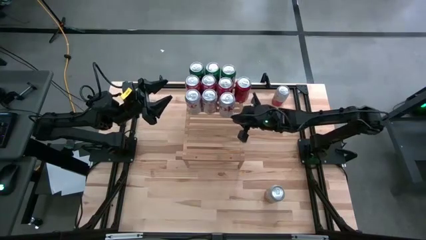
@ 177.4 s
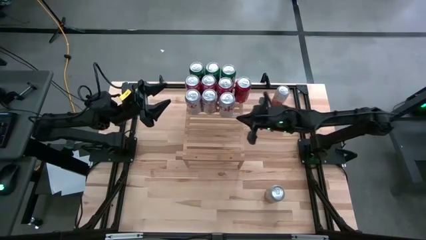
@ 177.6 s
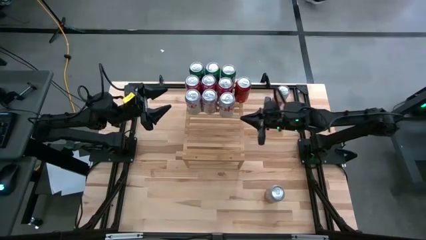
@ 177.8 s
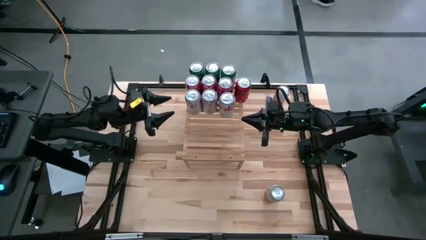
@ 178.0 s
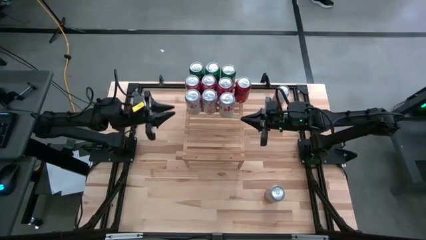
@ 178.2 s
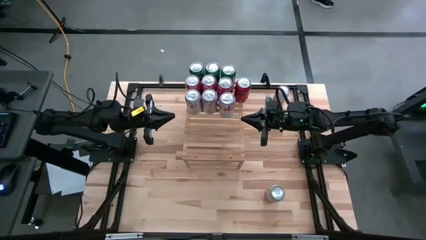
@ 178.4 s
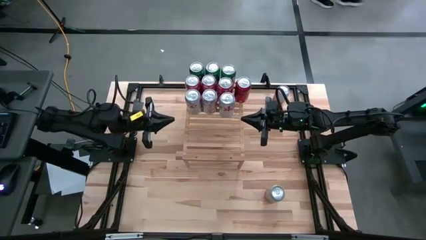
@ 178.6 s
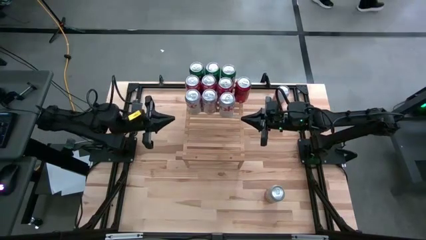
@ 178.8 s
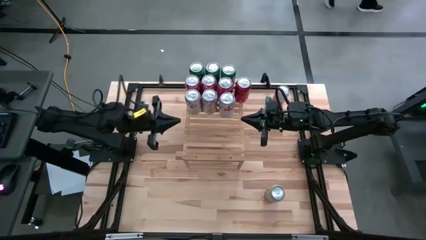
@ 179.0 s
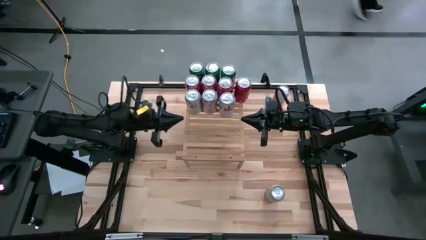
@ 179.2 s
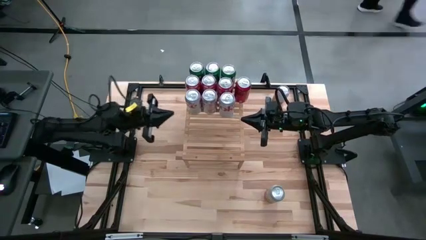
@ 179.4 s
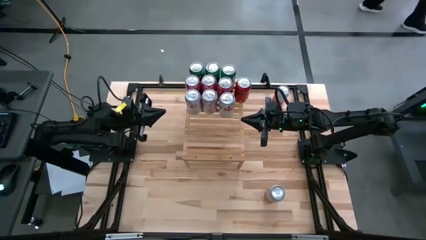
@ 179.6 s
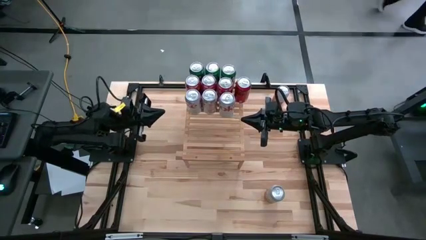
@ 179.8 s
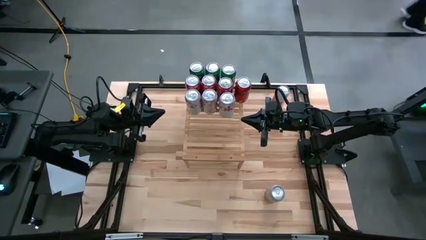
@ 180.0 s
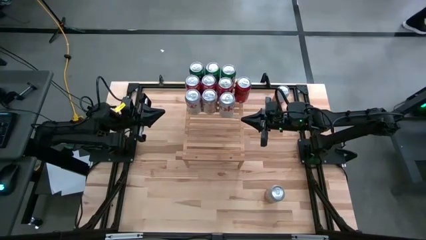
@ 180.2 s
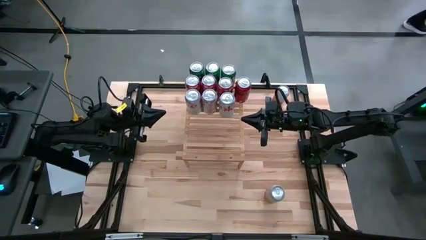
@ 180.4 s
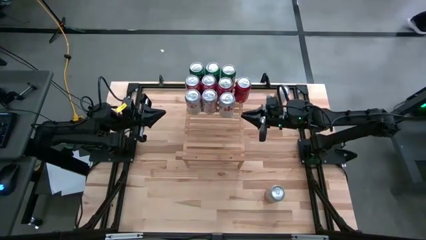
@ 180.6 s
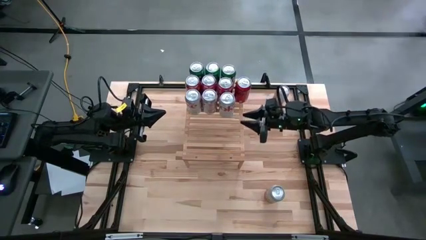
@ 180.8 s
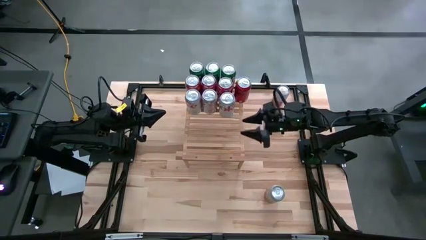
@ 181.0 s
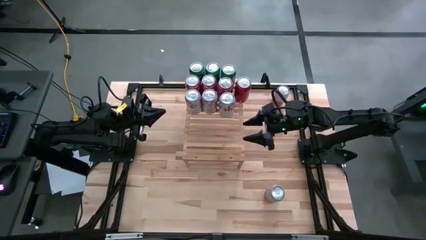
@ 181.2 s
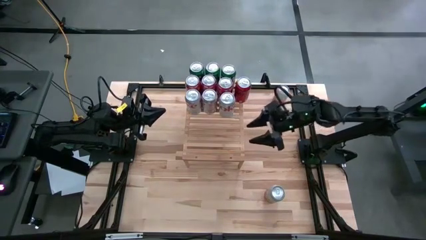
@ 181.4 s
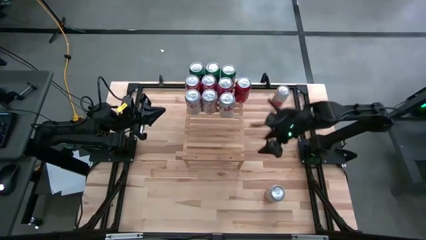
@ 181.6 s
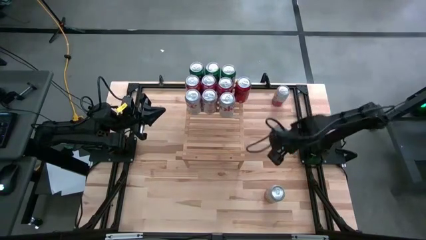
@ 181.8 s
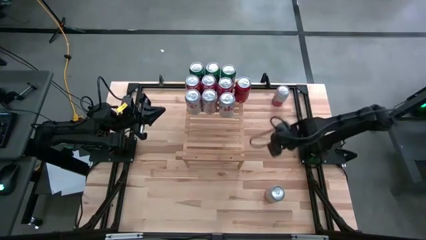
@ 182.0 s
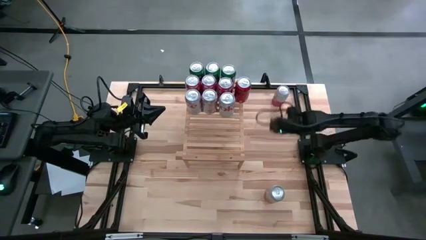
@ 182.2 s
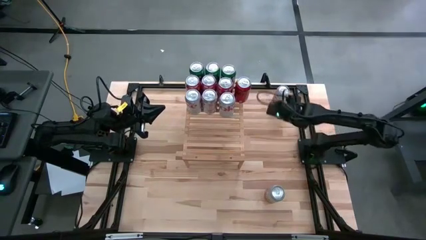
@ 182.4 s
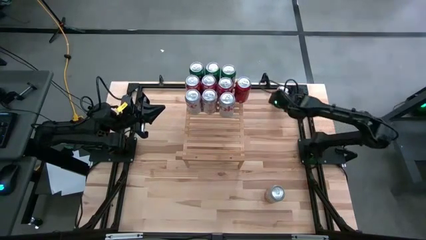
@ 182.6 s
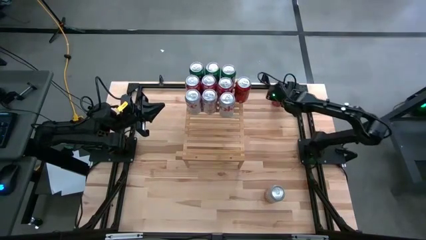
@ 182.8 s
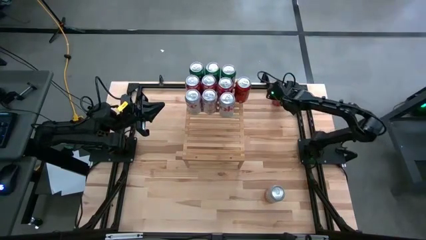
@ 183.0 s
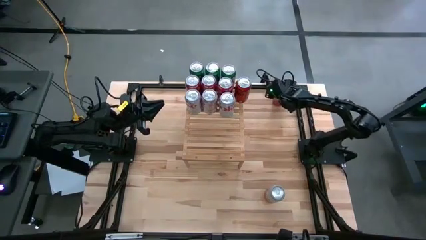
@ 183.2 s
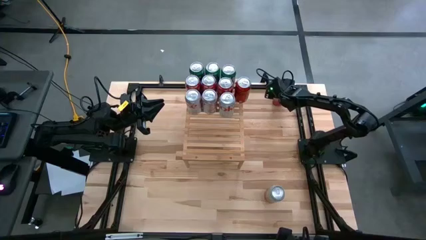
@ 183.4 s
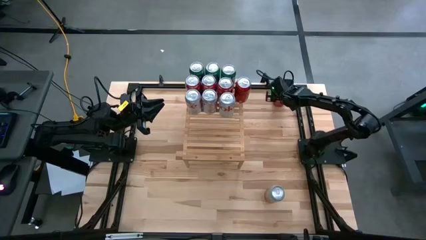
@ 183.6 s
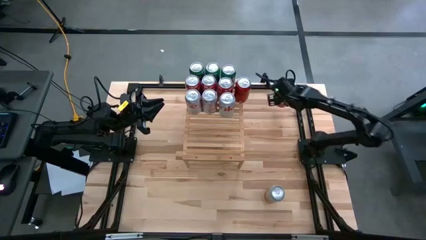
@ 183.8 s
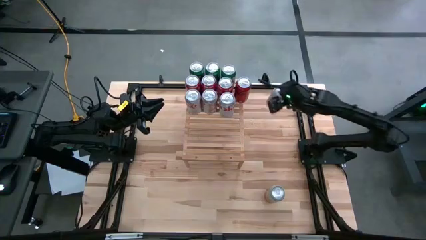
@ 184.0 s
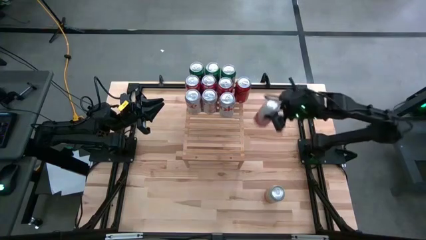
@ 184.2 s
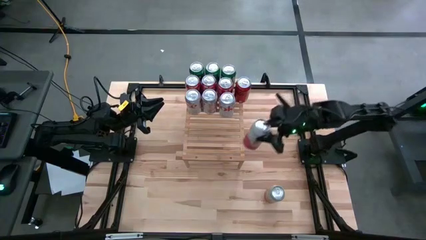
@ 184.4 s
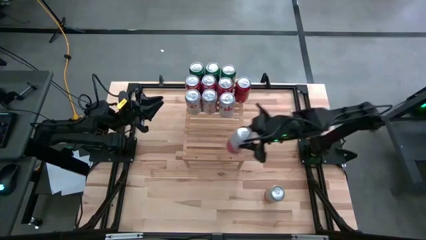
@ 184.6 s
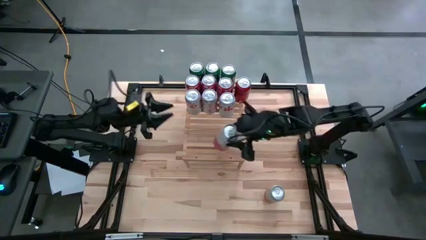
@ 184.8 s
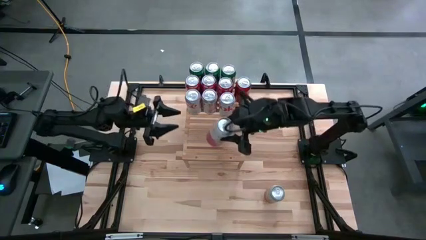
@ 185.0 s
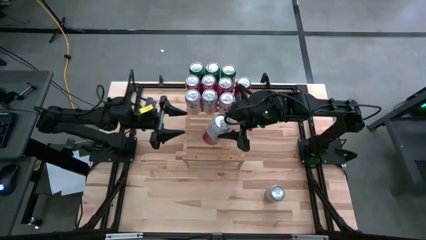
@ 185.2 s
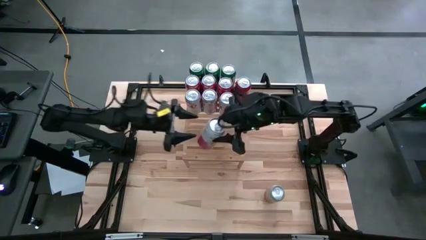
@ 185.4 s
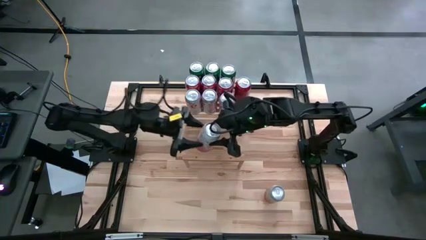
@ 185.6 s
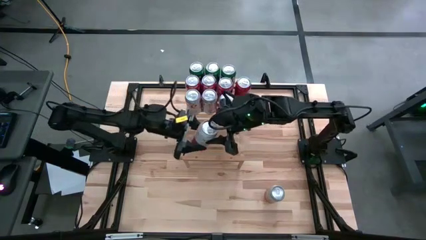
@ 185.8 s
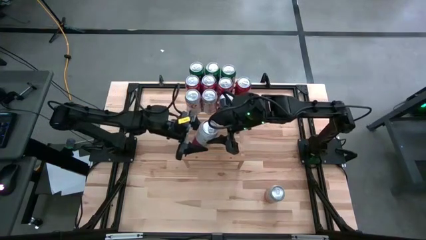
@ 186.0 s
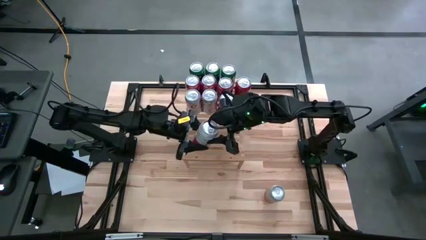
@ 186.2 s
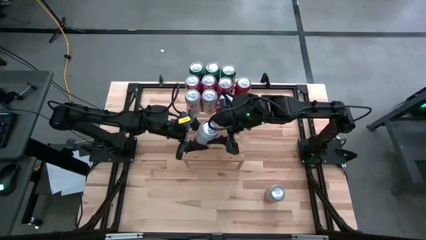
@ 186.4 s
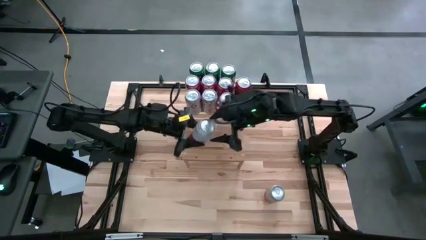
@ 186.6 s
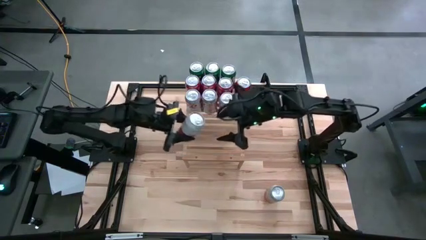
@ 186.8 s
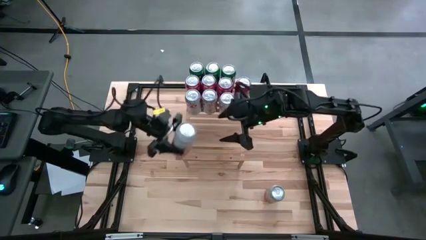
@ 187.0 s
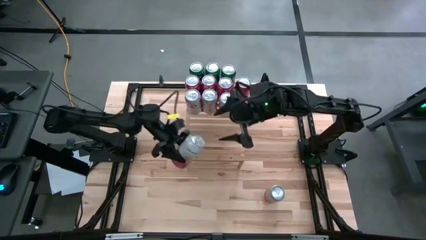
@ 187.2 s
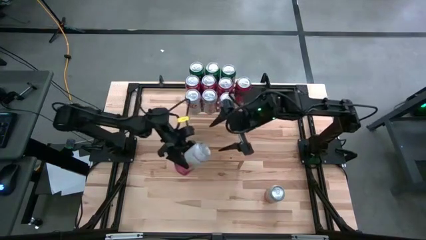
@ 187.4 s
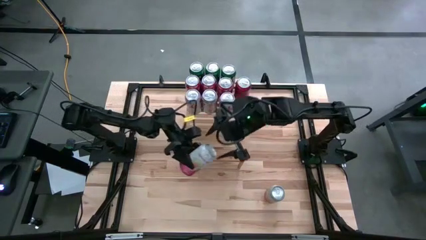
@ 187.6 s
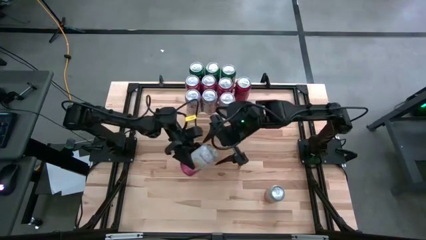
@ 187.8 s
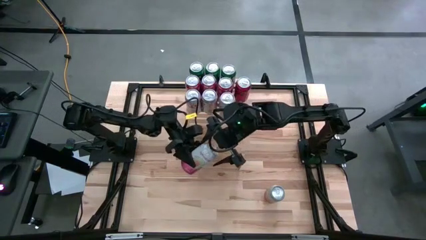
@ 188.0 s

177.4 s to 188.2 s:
Task: Place canned beverage on shelf
Put the top pink soda can on the shelf

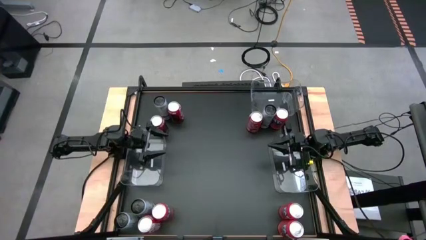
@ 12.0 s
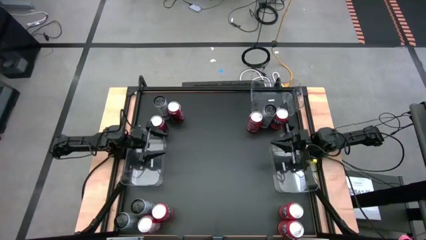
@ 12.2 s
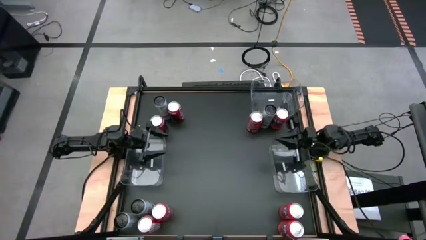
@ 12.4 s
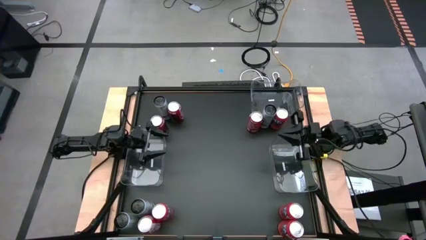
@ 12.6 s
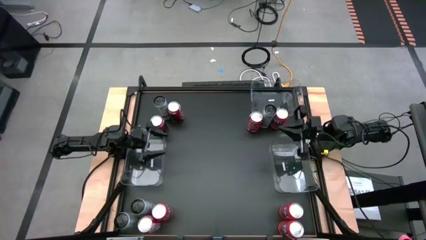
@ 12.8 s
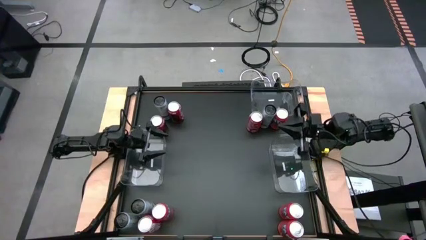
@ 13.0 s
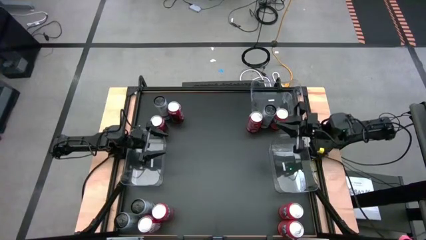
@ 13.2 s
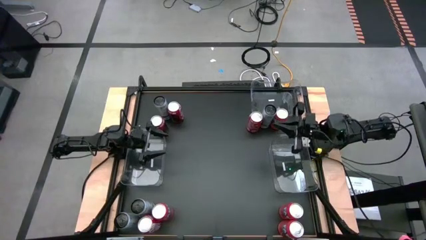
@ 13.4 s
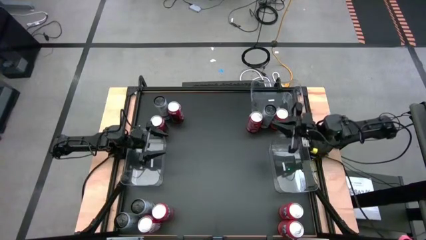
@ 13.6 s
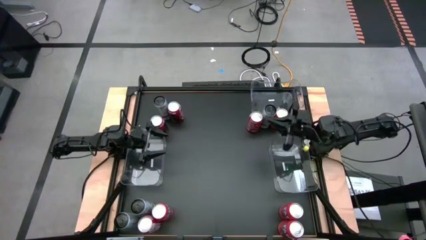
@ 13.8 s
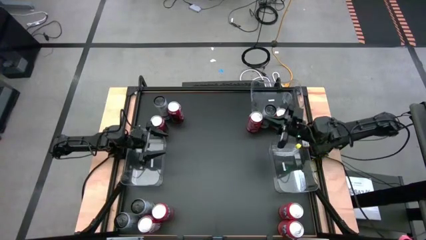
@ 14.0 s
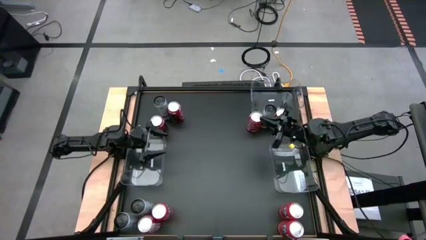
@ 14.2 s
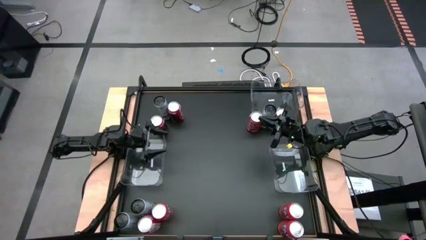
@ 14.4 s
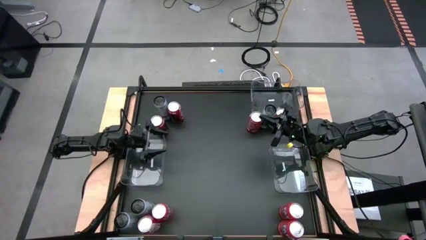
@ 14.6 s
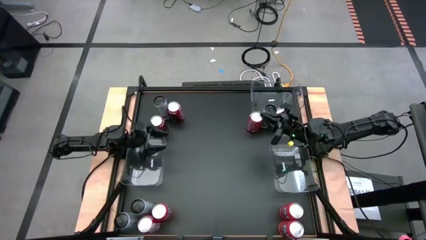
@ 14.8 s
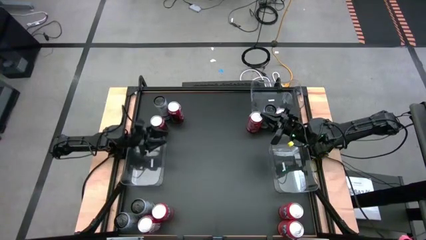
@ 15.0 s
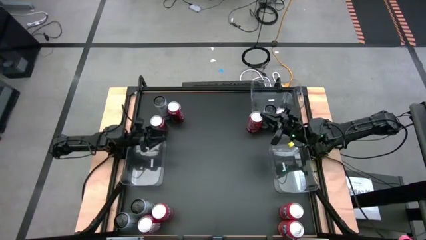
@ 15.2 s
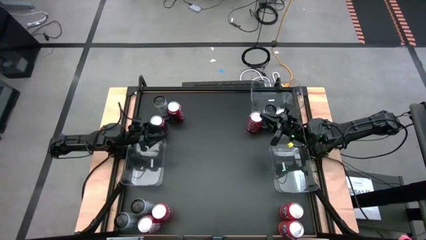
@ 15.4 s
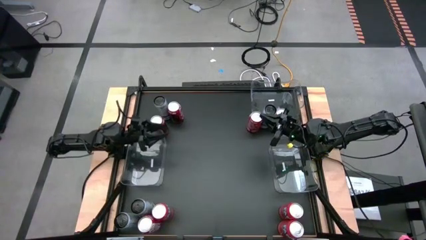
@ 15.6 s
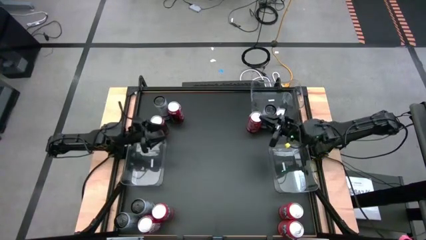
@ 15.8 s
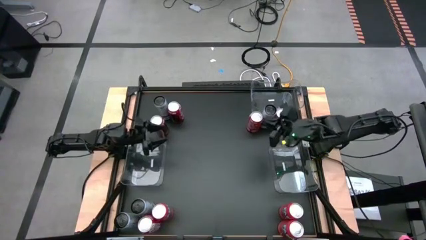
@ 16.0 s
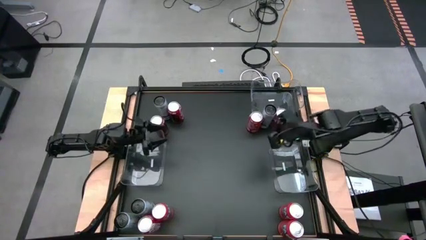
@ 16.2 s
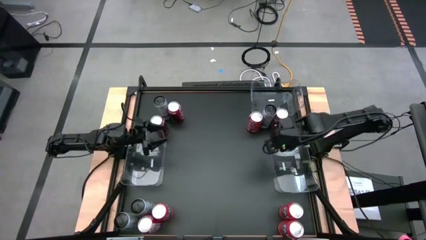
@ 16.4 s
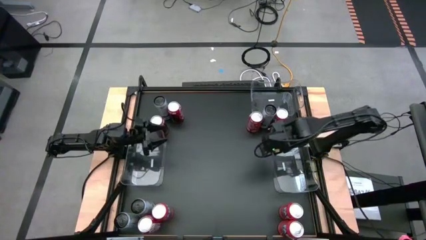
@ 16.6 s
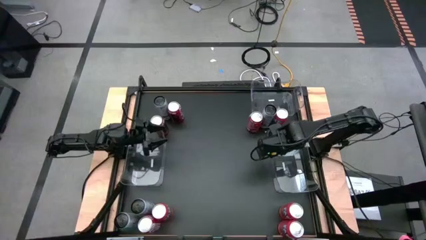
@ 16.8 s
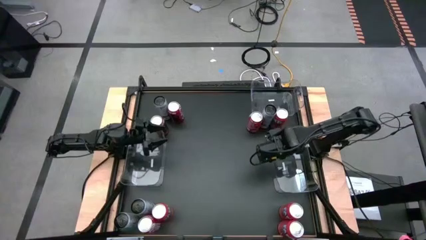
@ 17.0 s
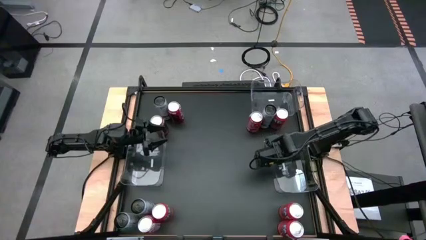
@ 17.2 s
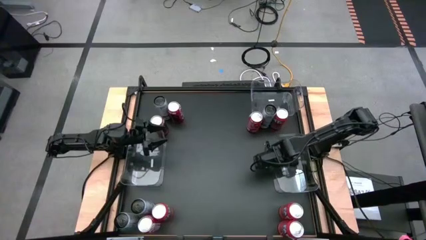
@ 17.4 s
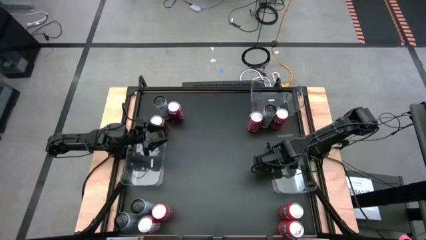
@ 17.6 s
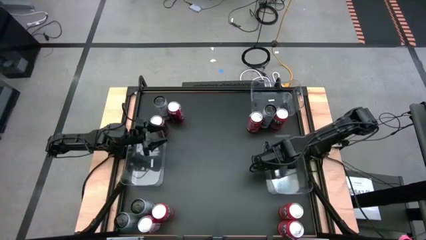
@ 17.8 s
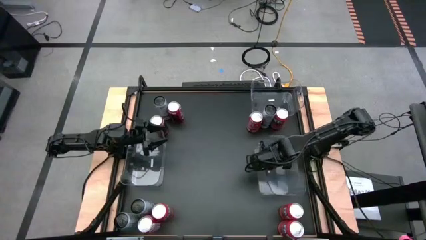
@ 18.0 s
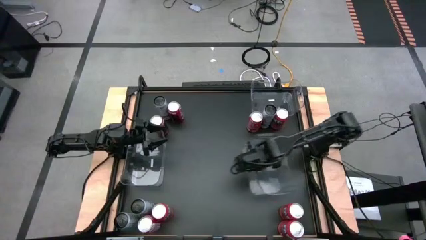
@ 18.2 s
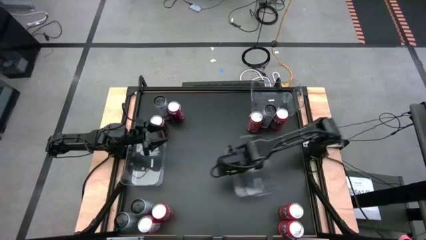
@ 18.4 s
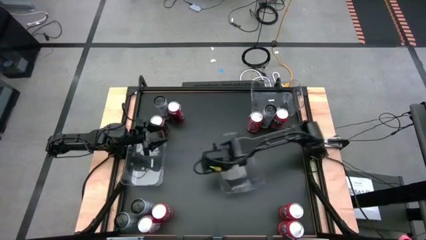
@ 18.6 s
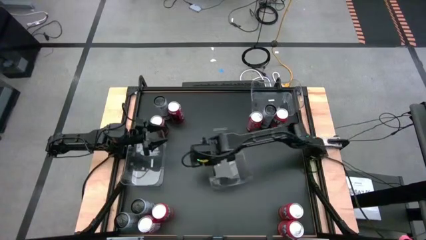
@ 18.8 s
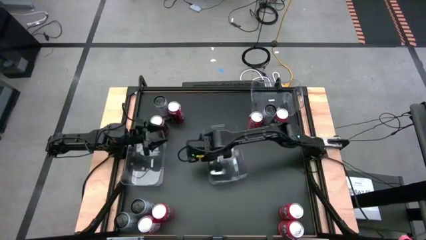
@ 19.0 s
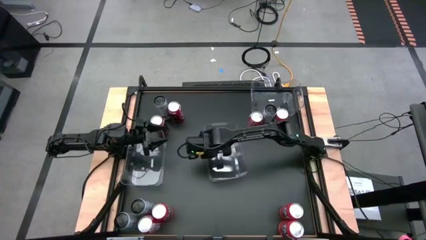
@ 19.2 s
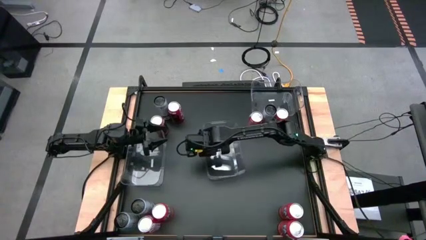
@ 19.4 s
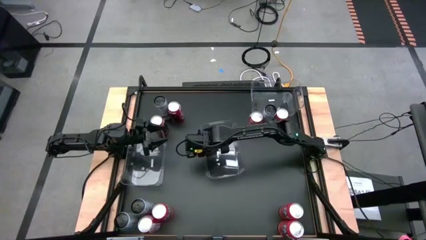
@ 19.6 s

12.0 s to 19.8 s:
Task: Sort soda cans
Move the bottom right transparent bin to the center of the table
